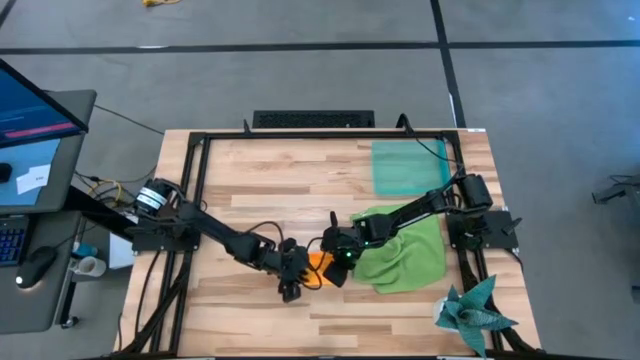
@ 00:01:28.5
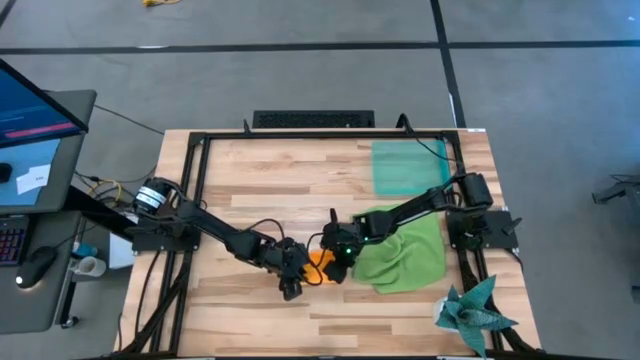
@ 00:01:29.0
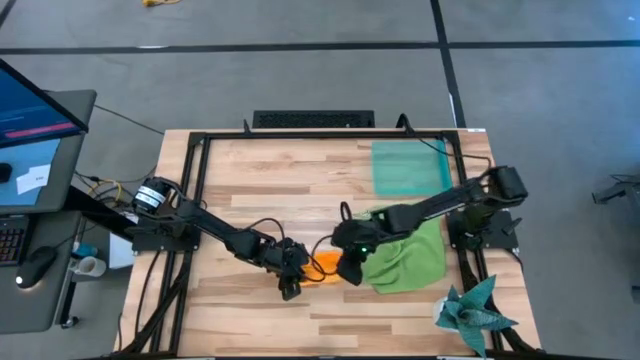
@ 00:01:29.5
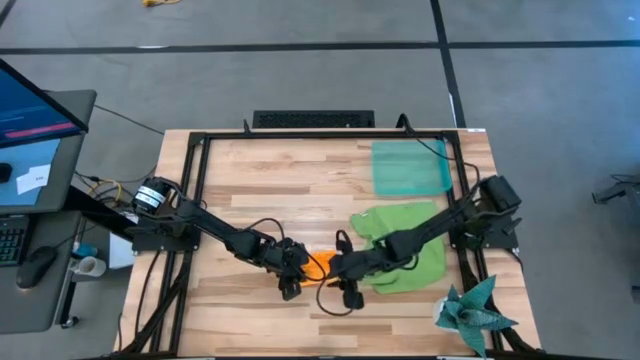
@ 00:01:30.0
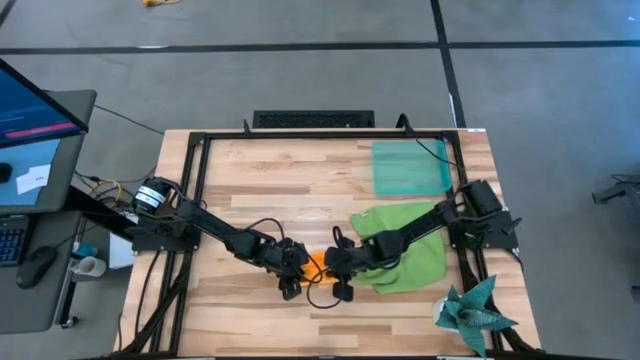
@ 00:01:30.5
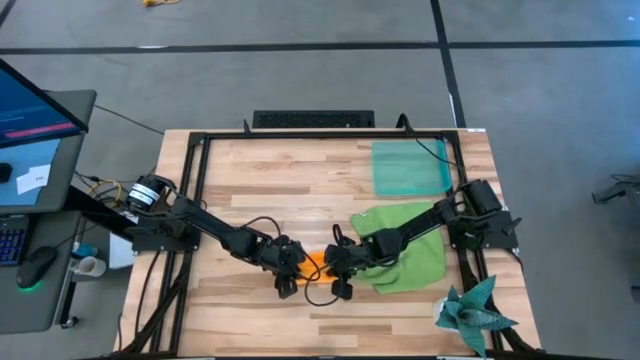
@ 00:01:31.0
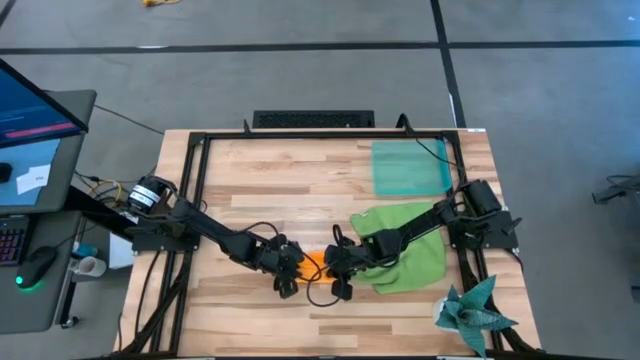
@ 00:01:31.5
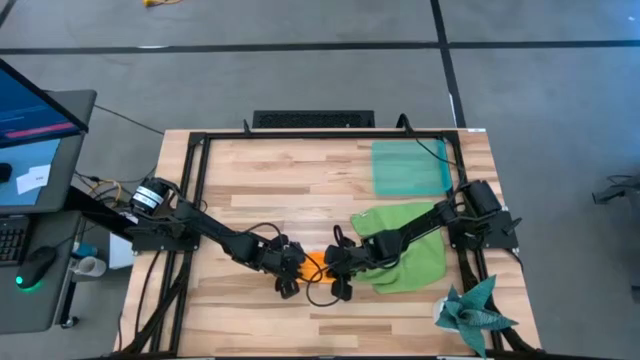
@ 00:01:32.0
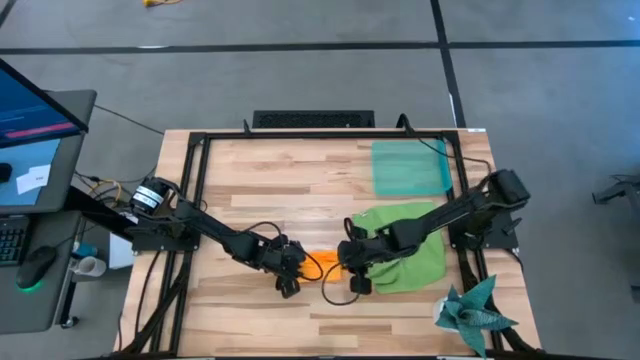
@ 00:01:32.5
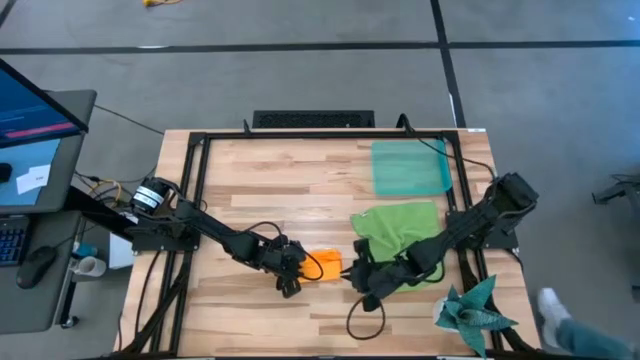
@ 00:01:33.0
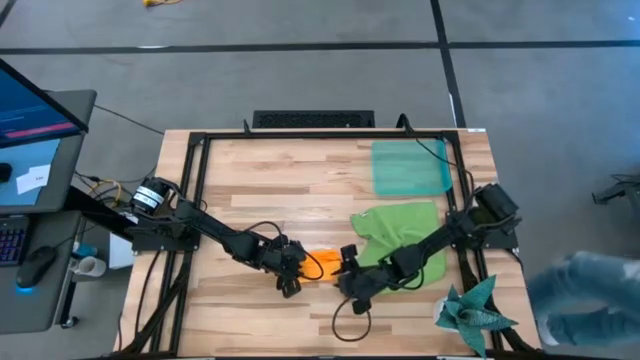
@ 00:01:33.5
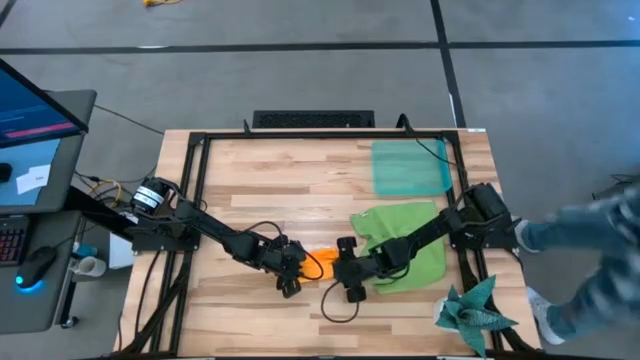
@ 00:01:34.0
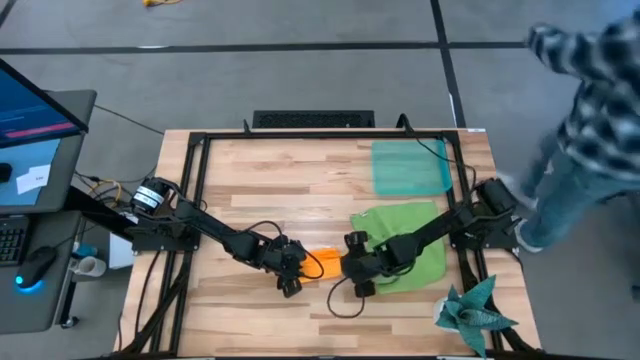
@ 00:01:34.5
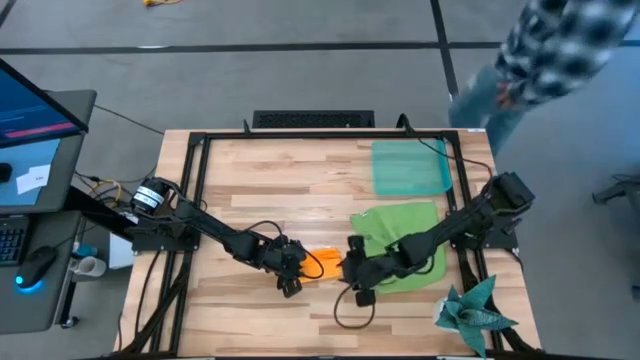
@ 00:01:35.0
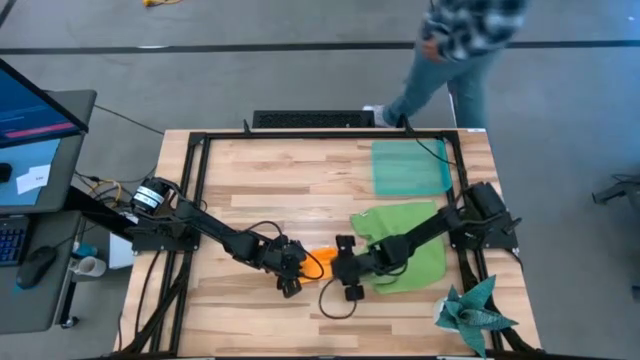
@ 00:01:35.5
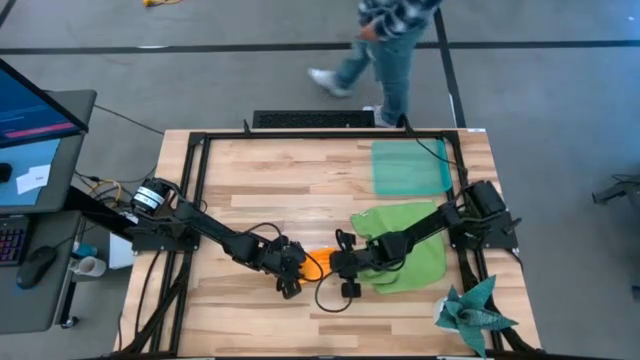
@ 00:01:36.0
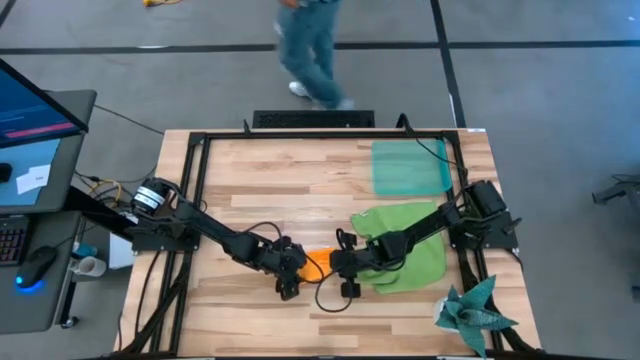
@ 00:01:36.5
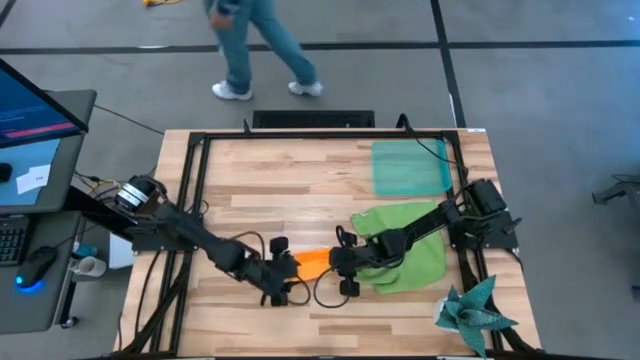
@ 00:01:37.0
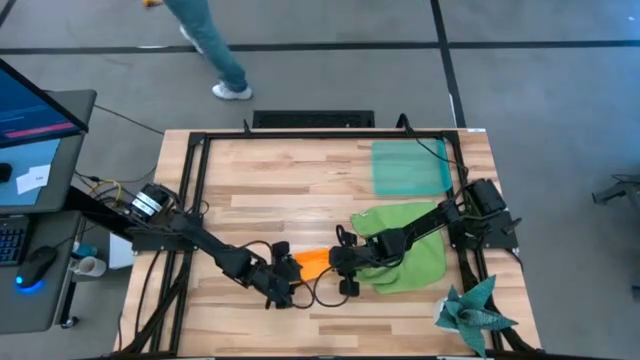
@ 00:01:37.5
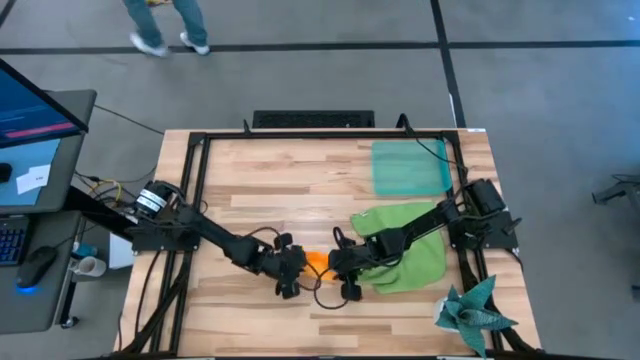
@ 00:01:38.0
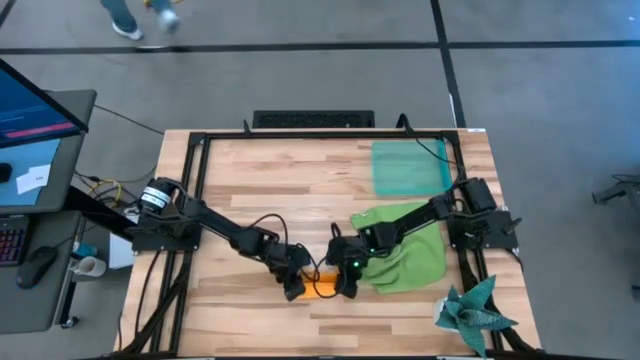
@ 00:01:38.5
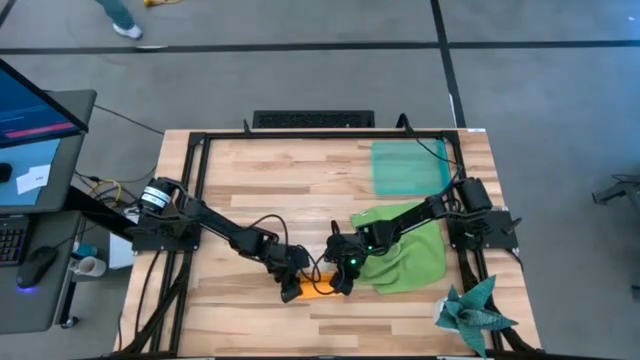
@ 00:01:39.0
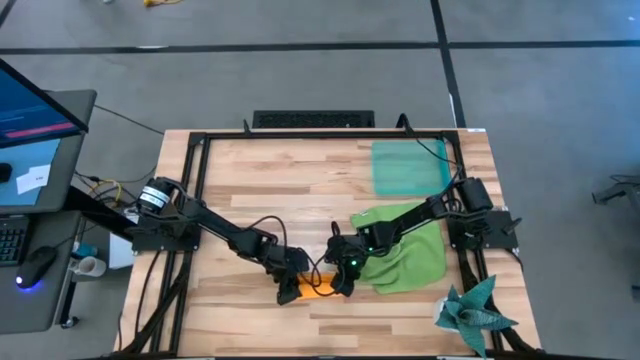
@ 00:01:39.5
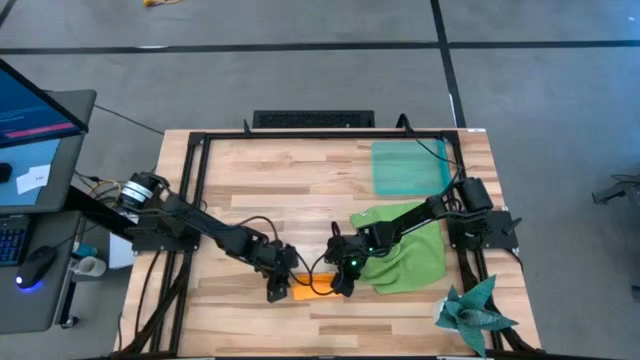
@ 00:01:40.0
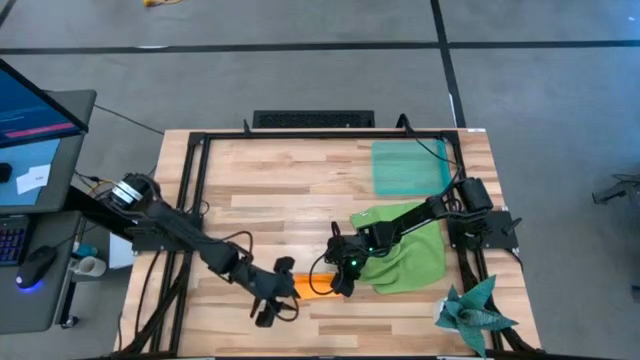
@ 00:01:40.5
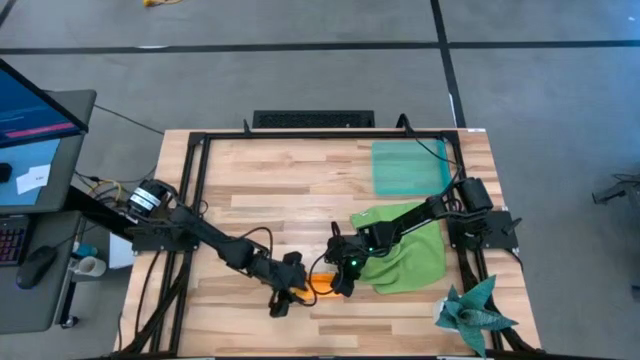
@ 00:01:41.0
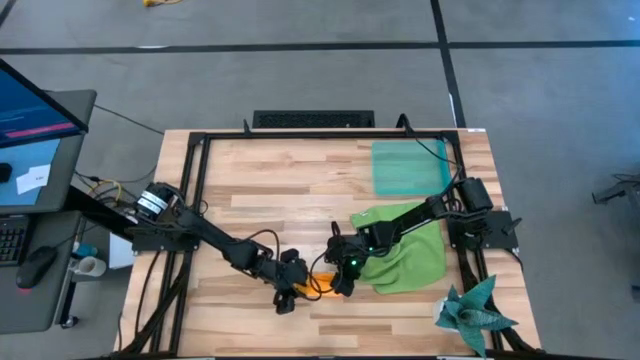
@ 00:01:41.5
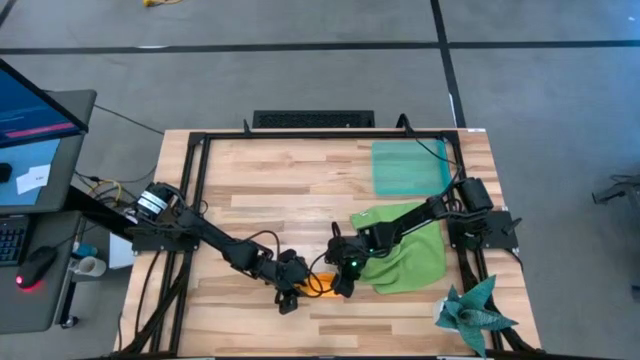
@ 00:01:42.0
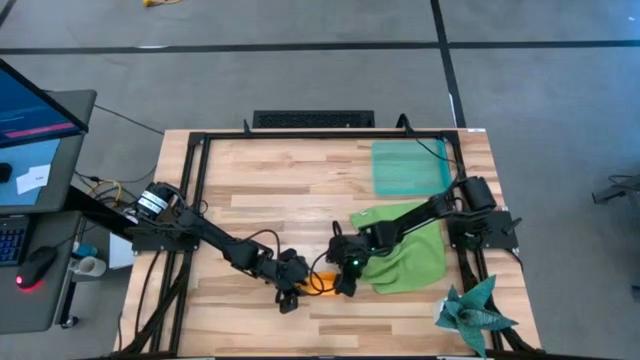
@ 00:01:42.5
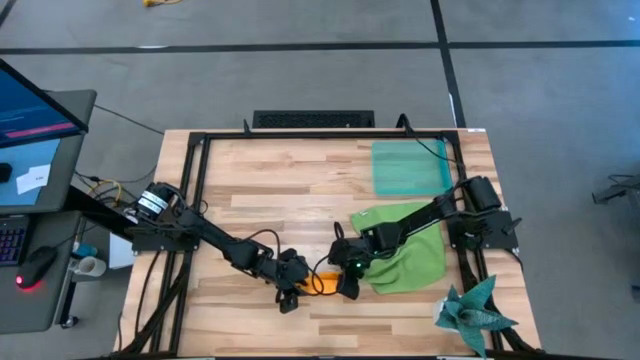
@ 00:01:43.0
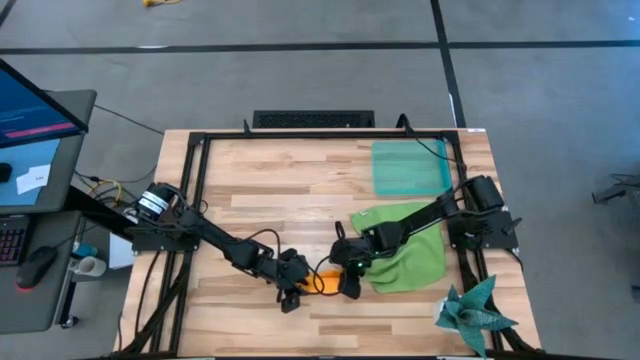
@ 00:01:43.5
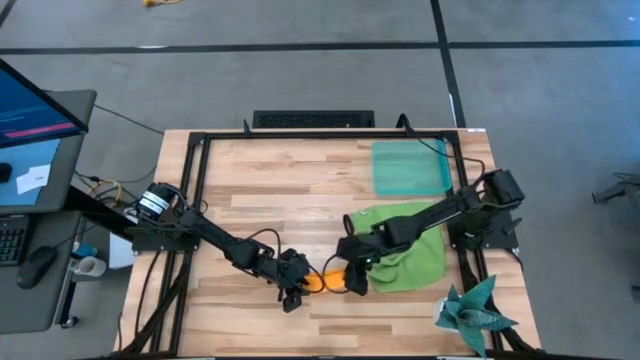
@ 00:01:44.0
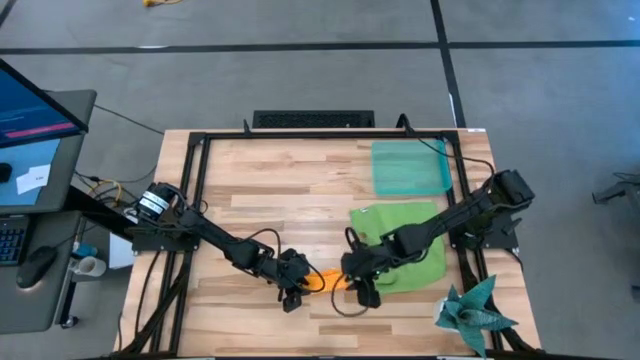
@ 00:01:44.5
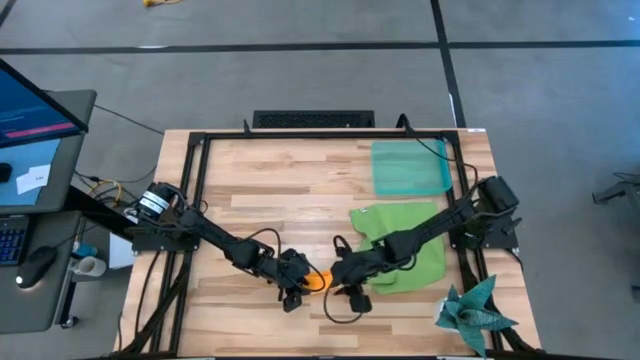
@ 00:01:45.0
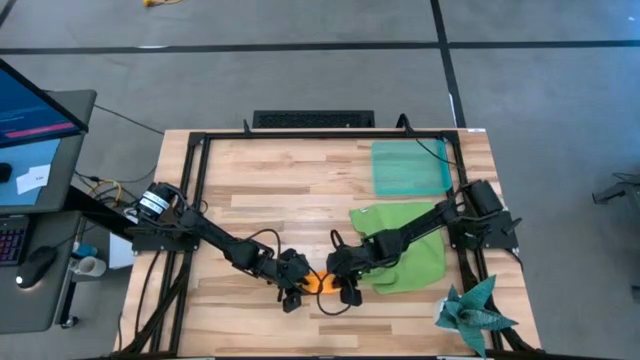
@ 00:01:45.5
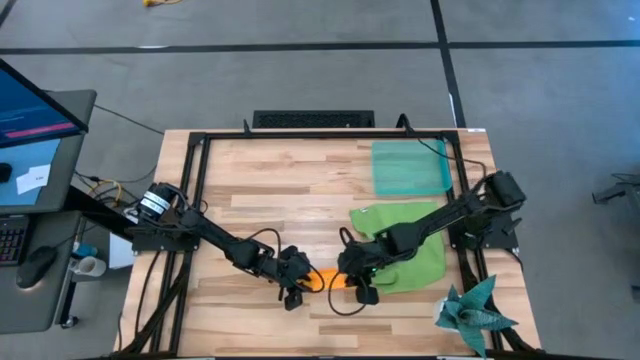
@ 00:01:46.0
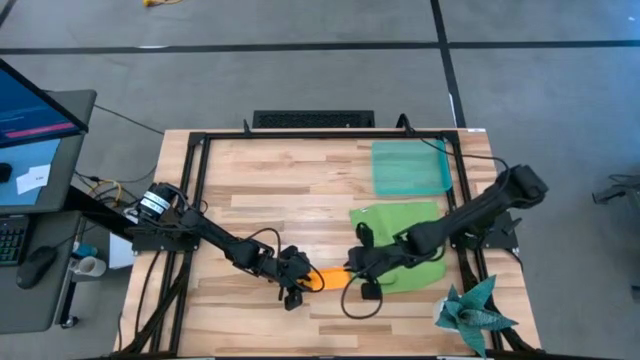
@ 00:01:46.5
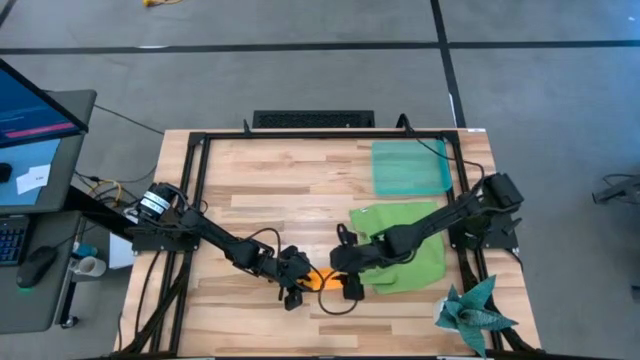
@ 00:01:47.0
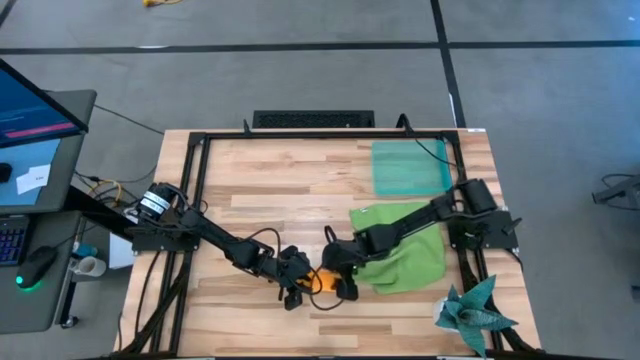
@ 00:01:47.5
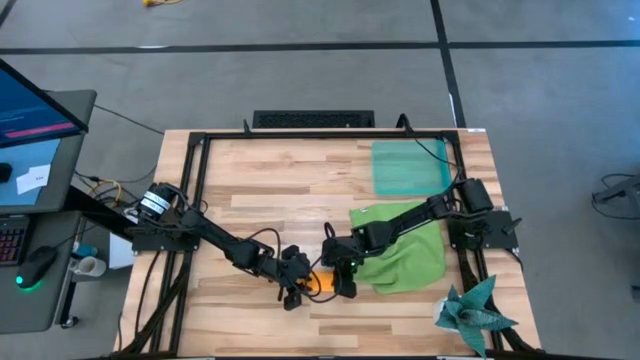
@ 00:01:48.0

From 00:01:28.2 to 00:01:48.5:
Task: Roll microfiber towels into tight, uniform cylinder then place into a basket
Roll the orange towel
